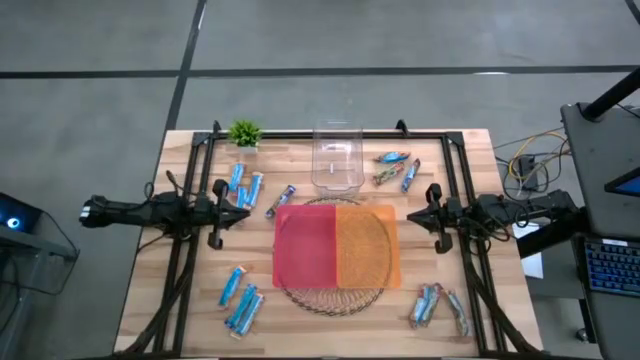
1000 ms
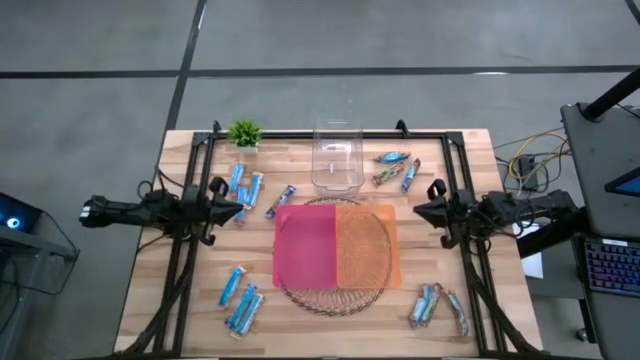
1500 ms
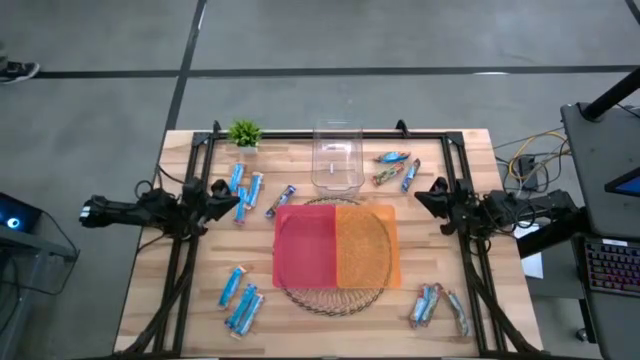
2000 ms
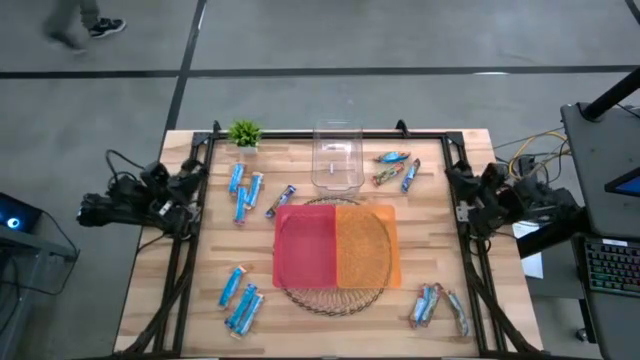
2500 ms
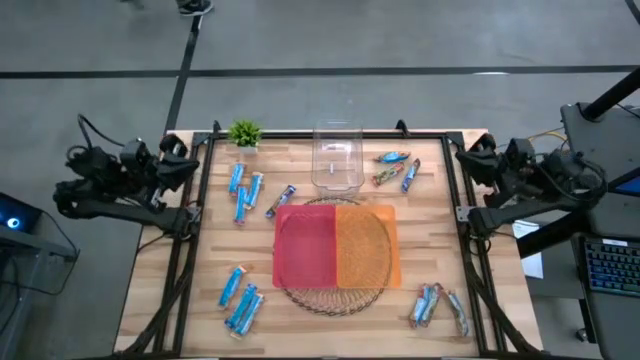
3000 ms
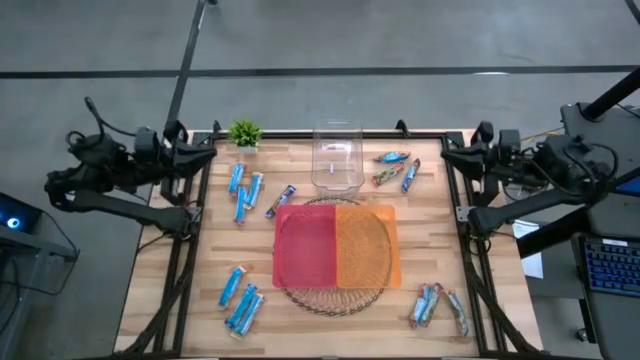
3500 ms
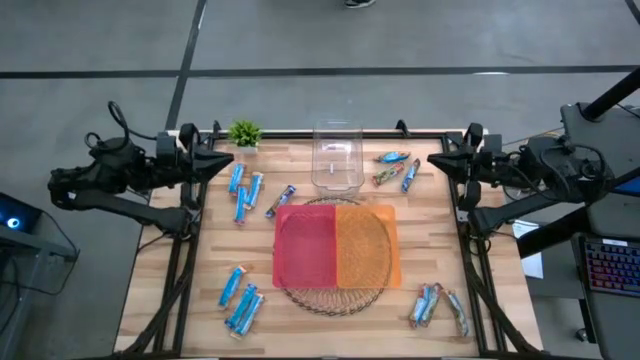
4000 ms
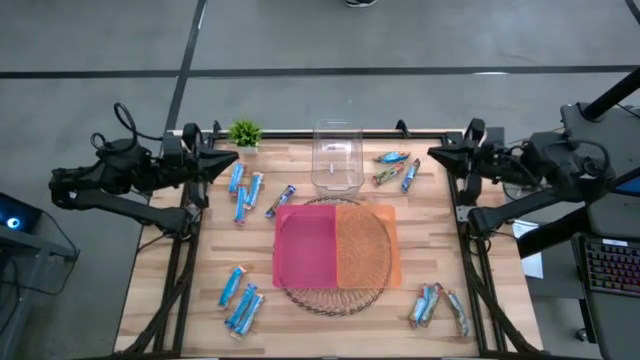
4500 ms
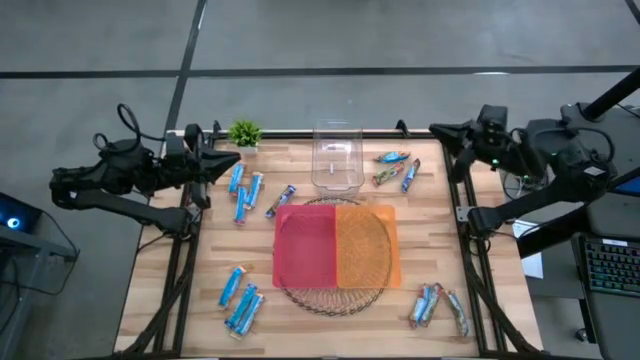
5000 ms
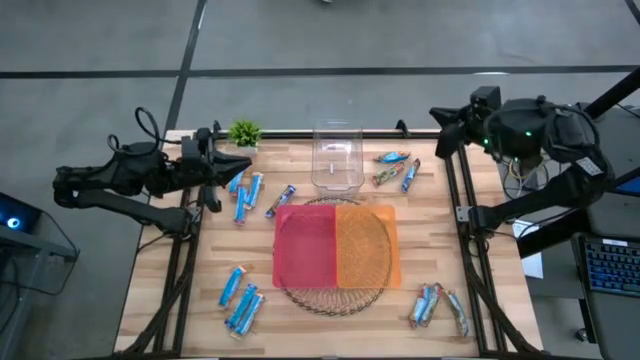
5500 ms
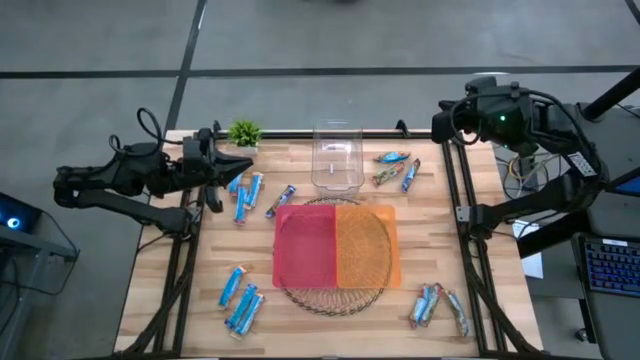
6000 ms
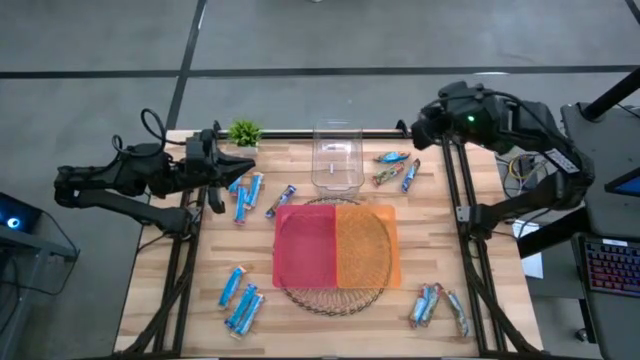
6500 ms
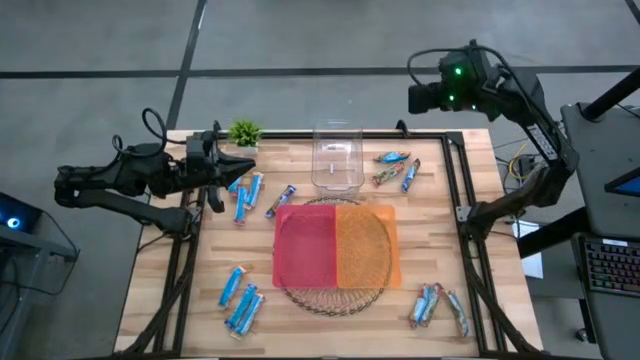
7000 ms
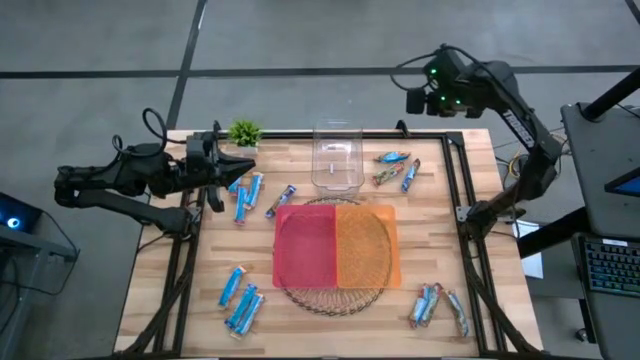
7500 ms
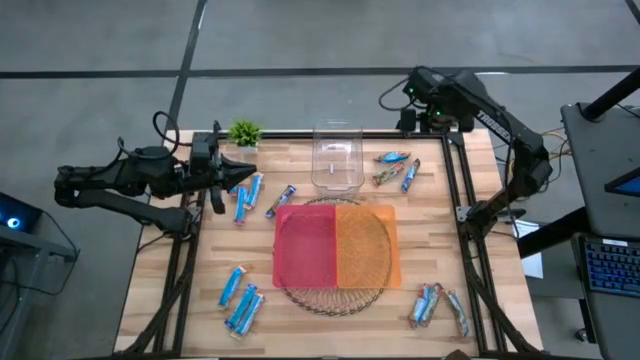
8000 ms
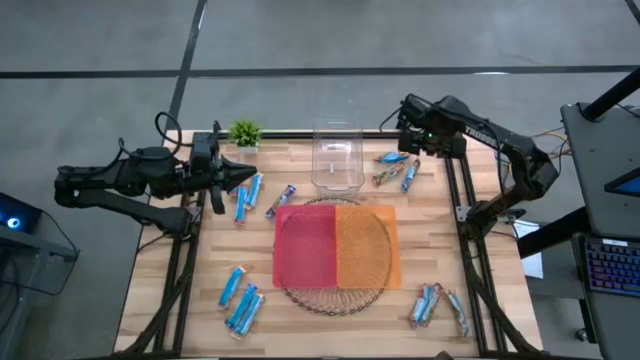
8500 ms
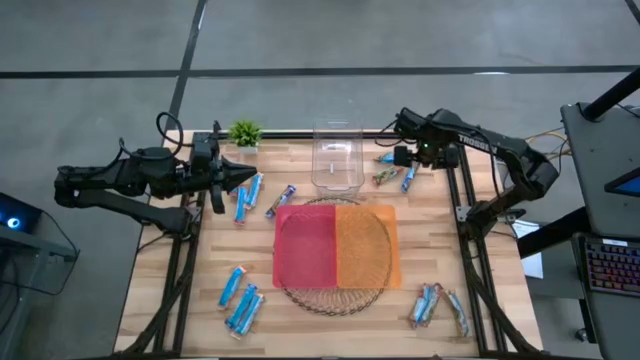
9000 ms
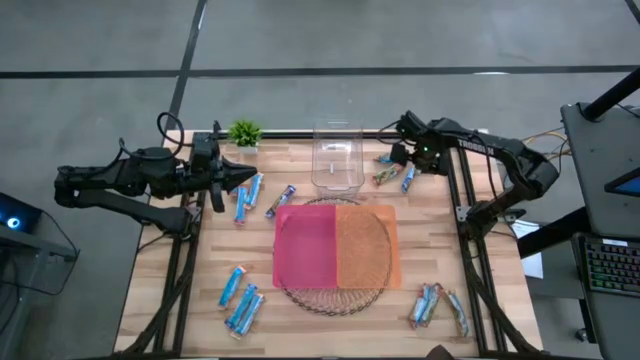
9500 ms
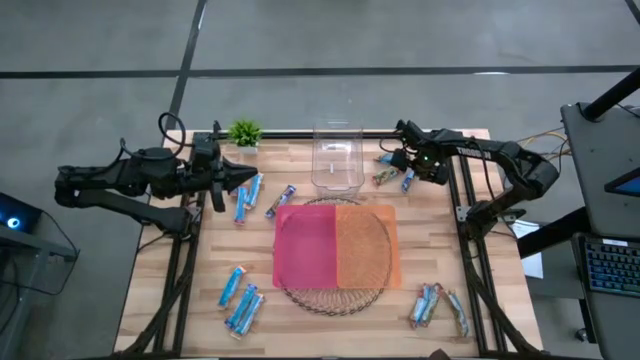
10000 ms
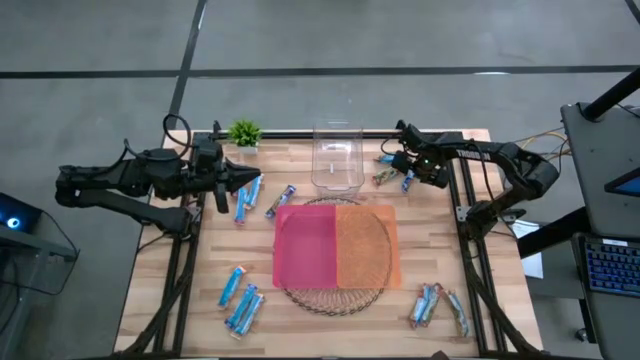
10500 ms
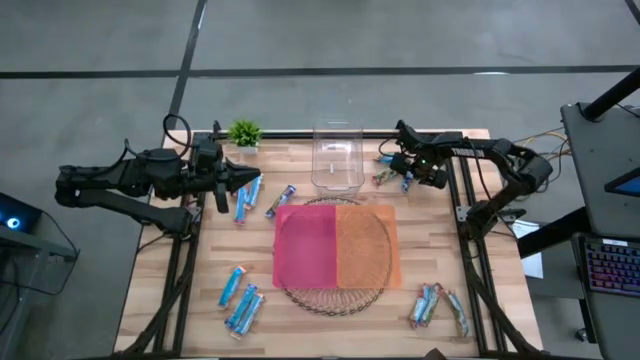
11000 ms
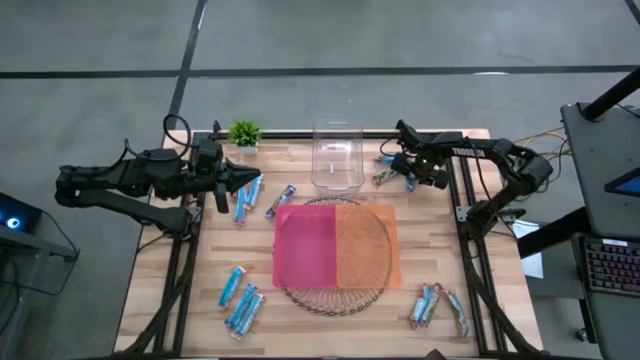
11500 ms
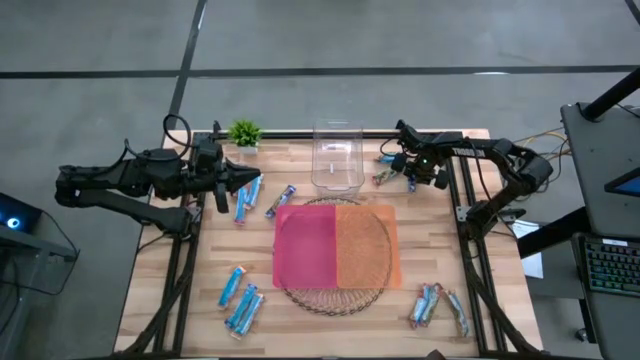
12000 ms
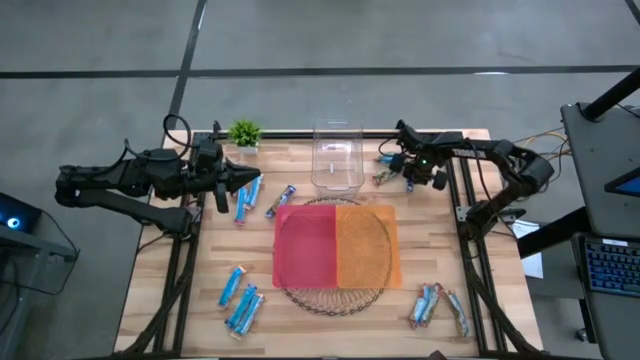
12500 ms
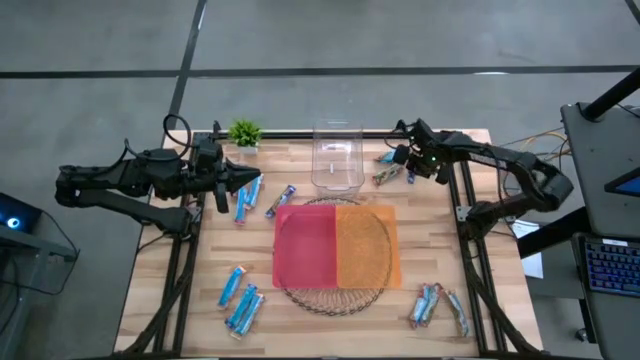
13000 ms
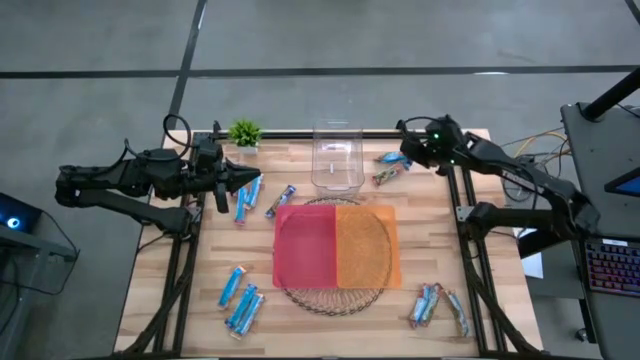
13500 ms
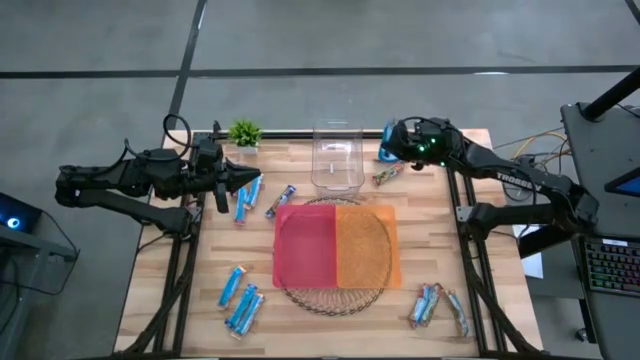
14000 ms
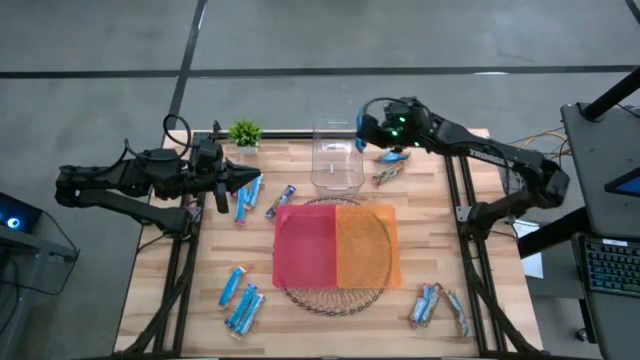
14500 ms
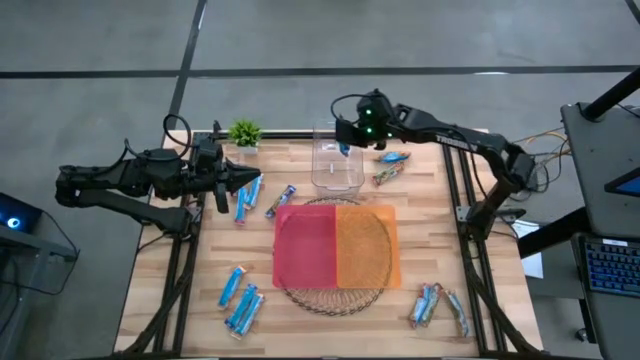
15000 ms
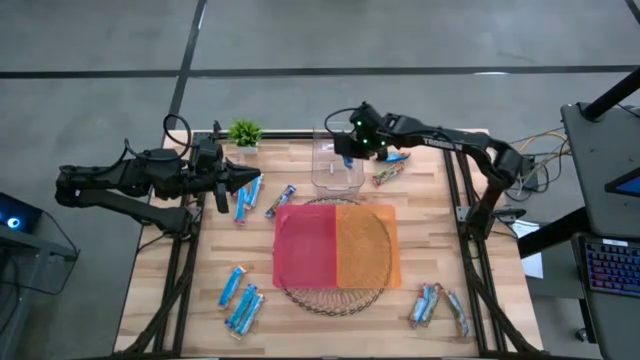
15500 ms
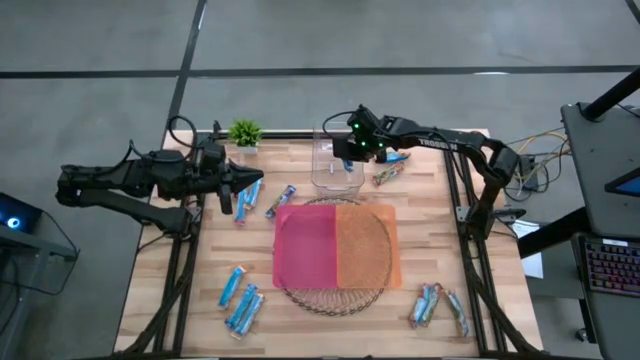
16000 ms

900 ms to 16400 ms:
Task: Pick and place Granola Bars by type
Put the blue granola bar into the transparent bin

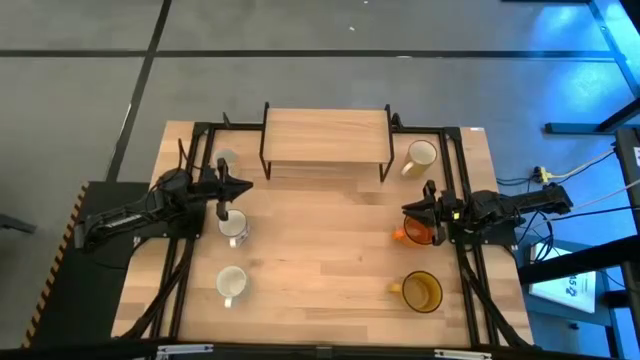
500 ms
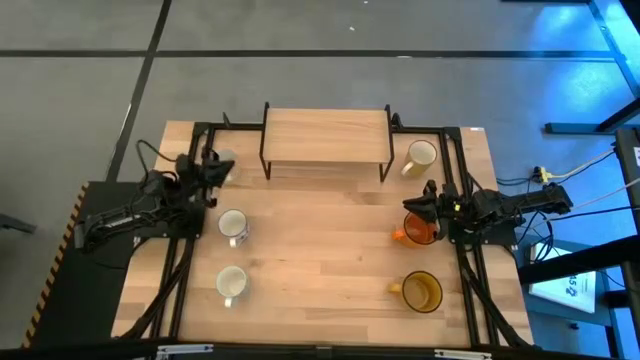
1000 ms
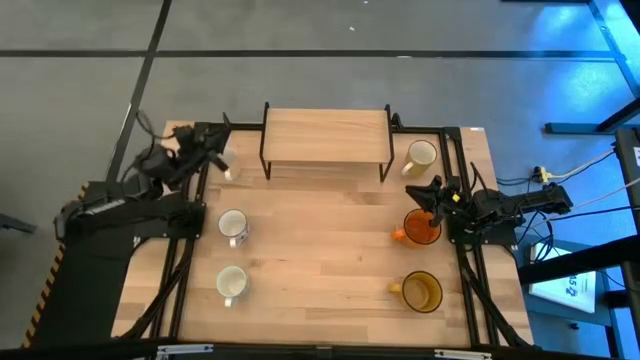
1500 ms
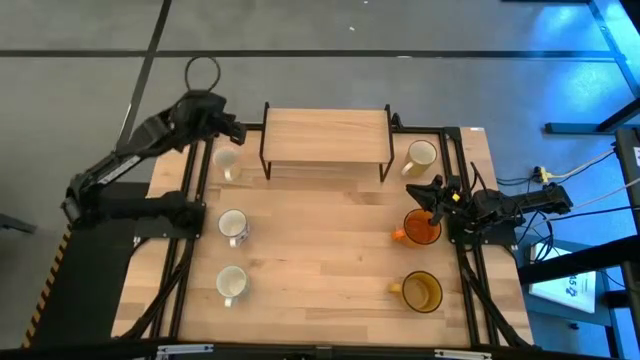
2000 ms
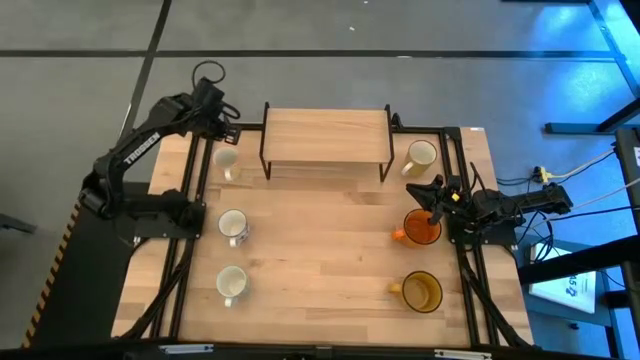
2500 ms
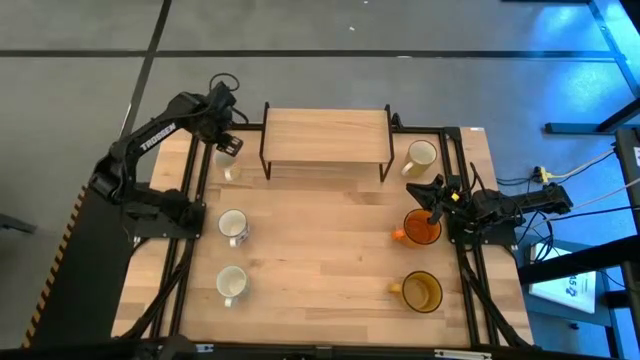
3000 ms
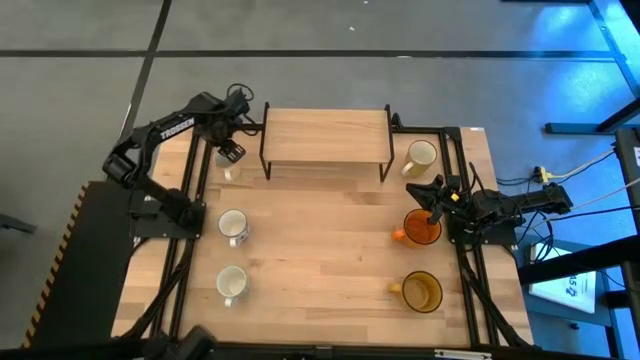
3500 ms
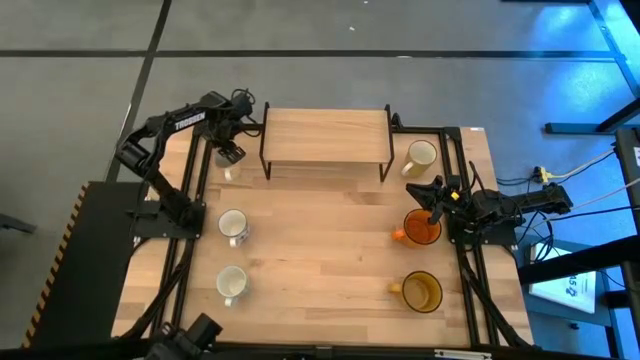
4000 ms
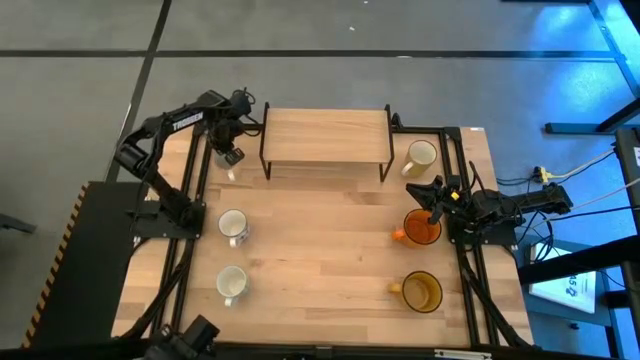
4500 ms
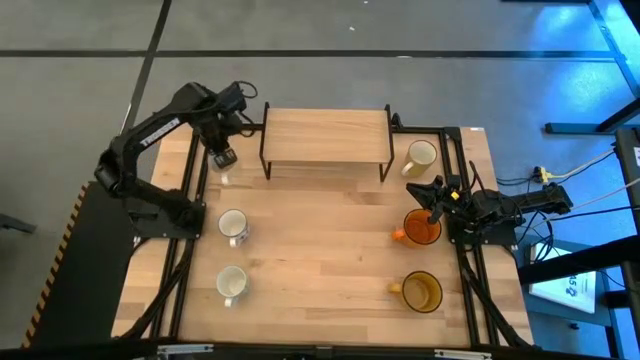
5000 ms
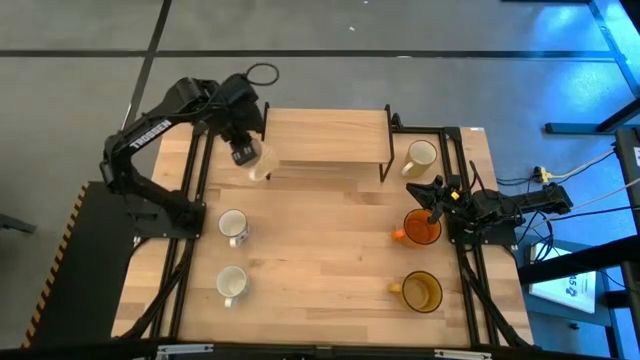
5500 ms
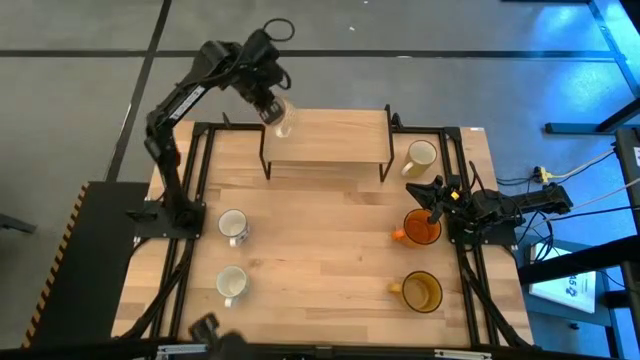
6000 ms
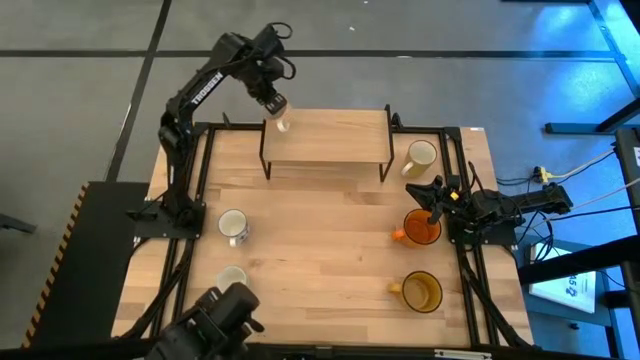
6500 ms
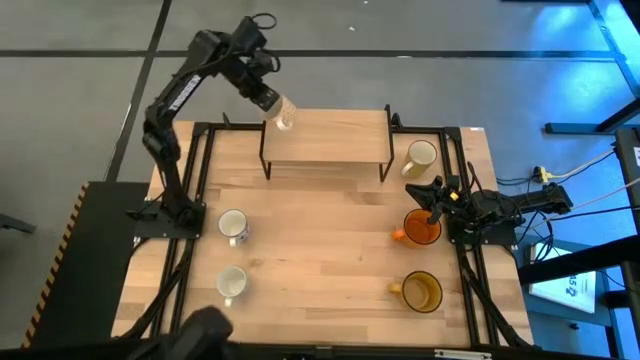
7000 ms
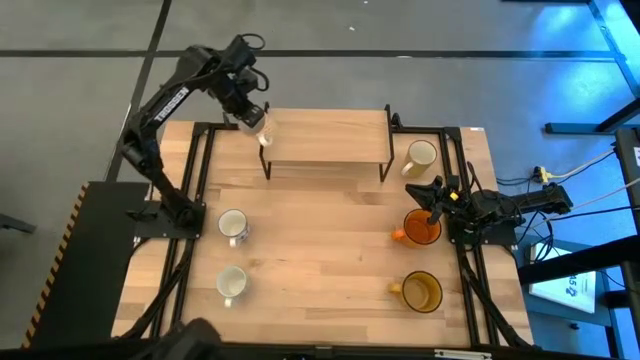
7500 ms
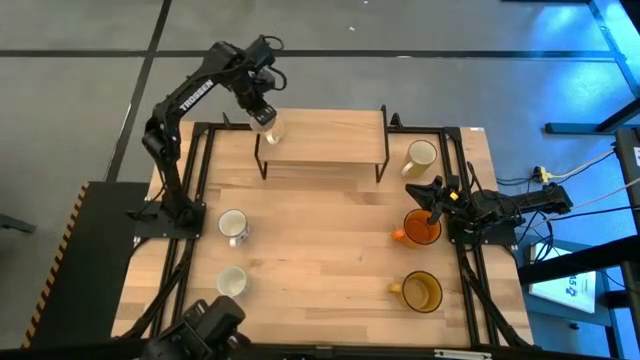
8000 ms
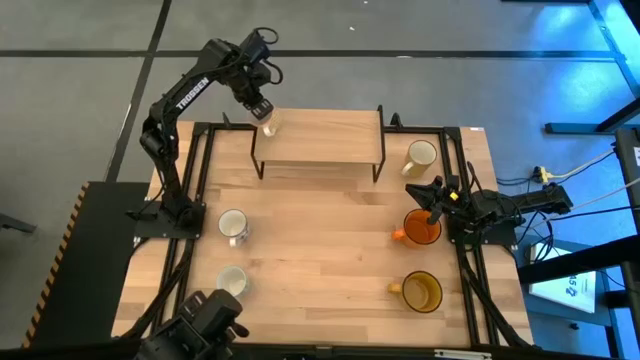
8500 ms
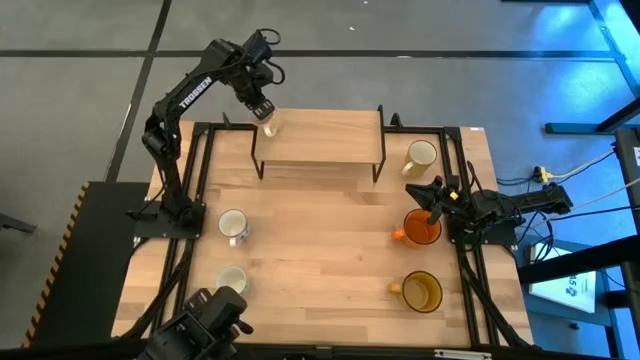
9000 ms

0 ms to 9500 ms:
Task: Place coffee mugs
Put the yellow patterned mug on the shelf
